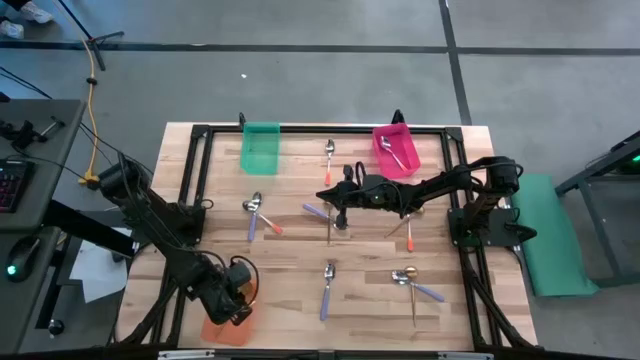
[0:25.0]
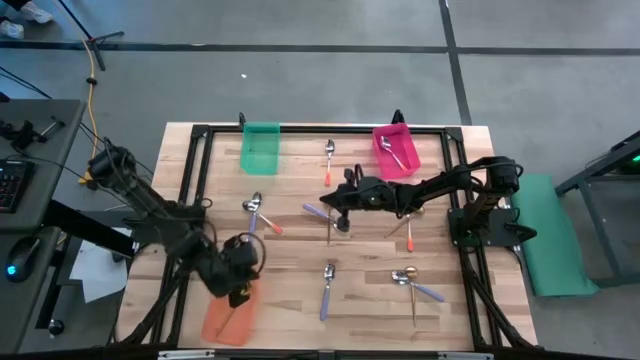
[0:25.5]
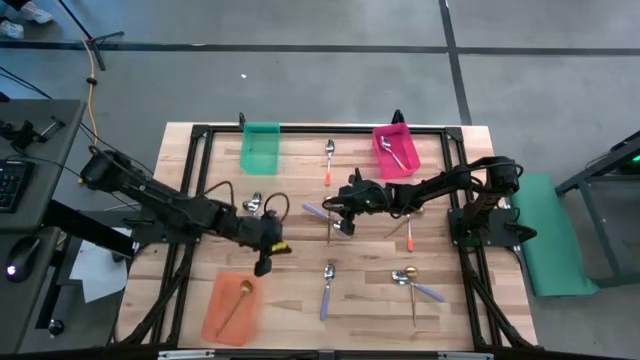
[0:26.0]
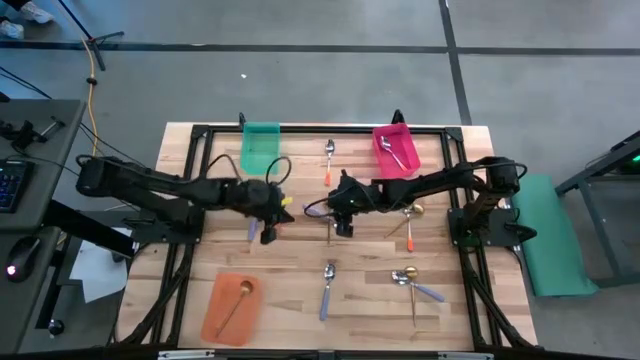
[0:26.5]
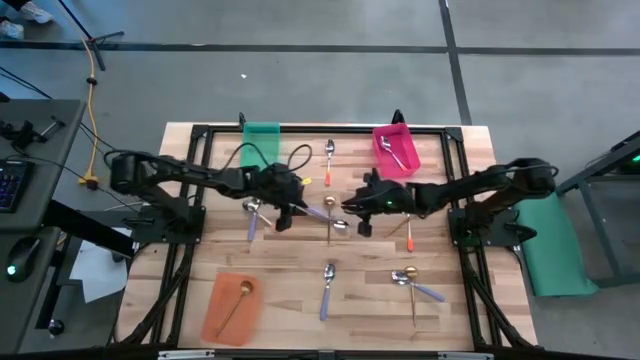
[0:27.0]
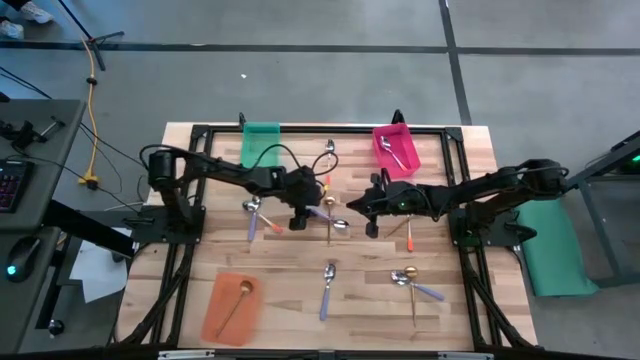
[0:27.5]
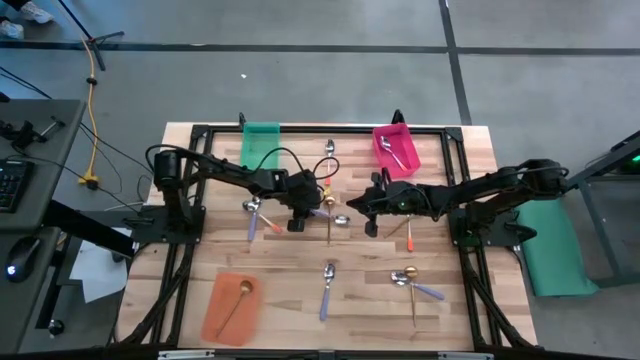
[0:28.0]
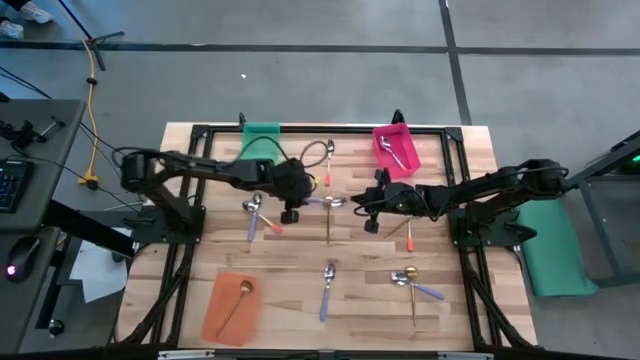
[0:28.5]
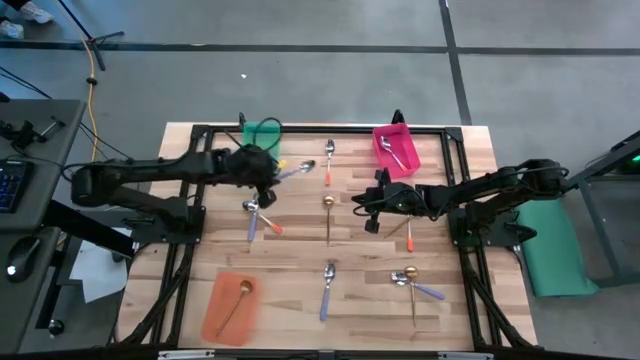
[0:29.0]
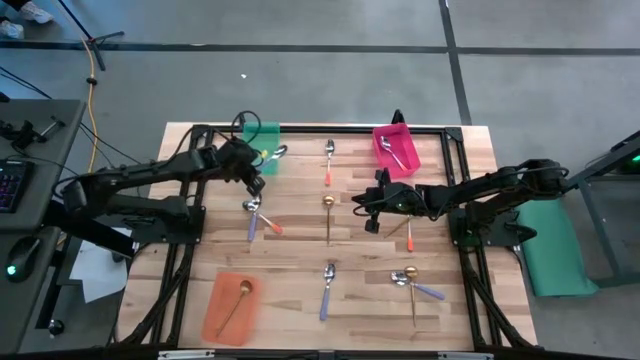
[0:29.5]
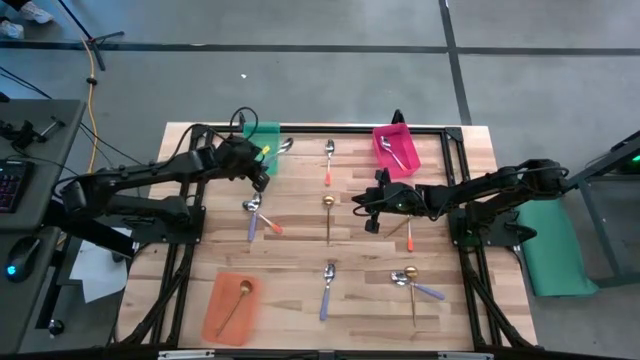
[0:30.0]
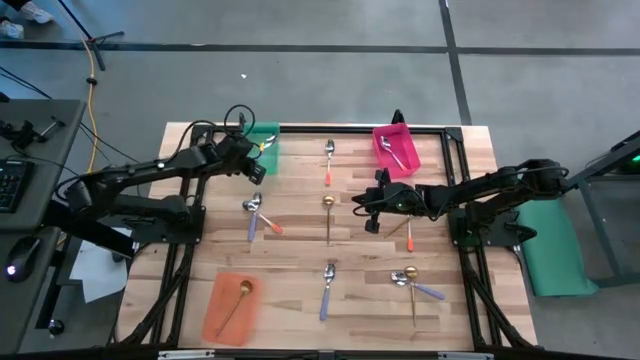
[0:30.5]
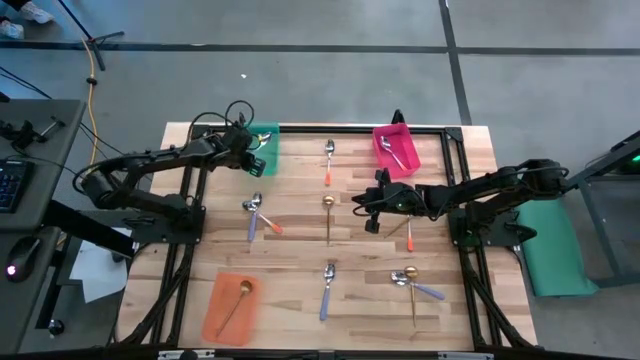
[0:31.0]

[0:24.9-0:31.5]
Task: Sort silverware by color (type)
Put the purple spoon into the blue bin

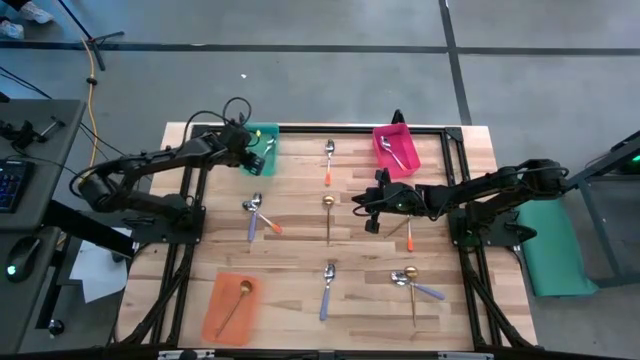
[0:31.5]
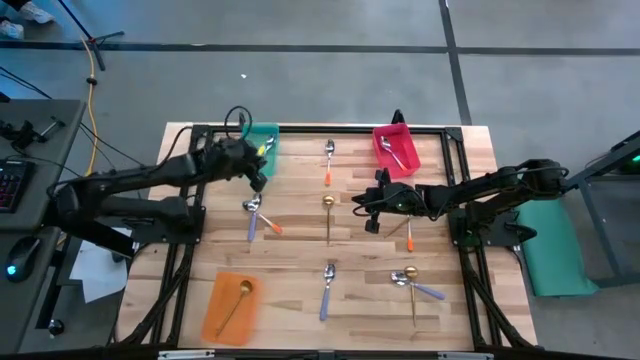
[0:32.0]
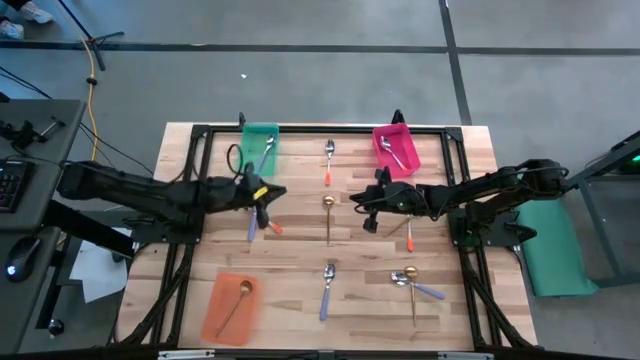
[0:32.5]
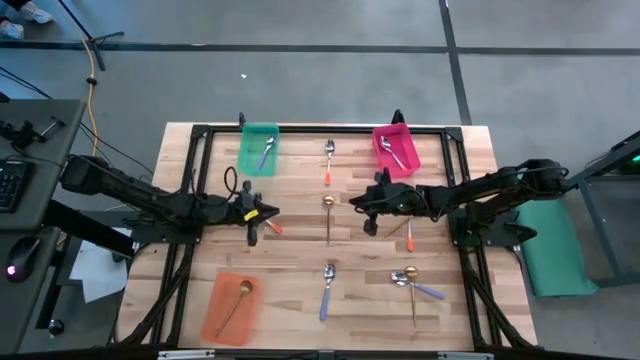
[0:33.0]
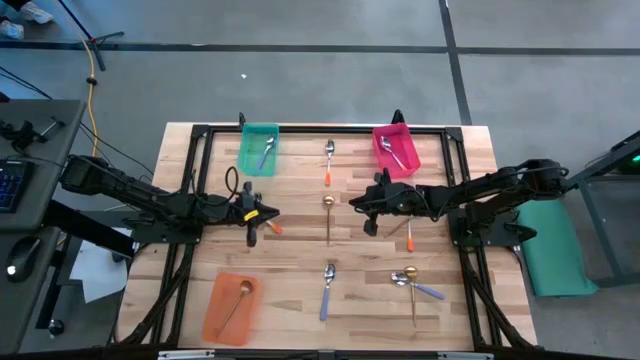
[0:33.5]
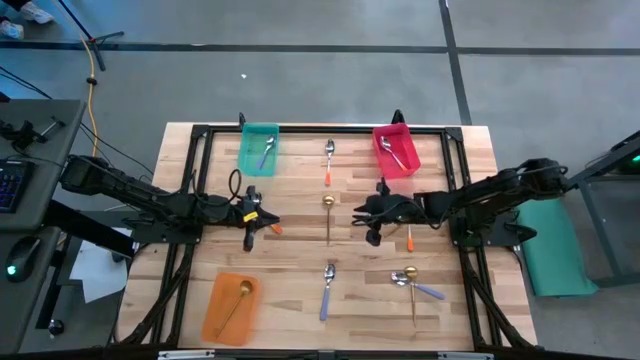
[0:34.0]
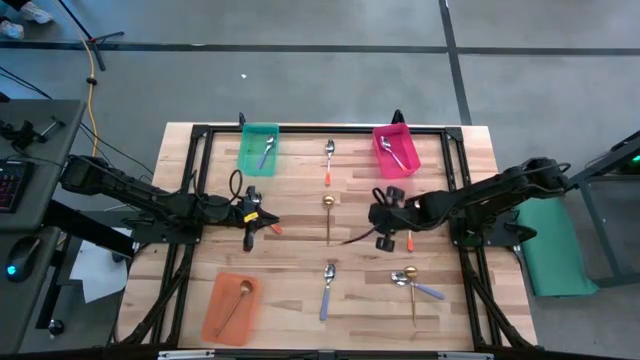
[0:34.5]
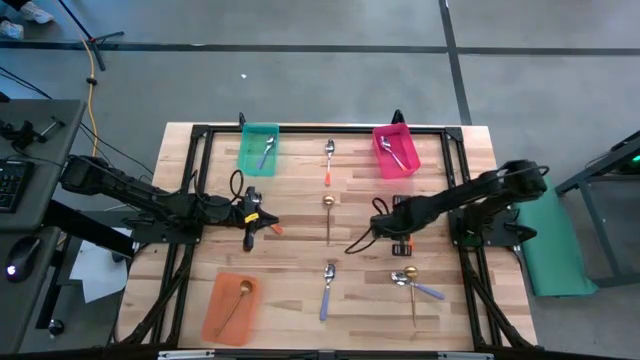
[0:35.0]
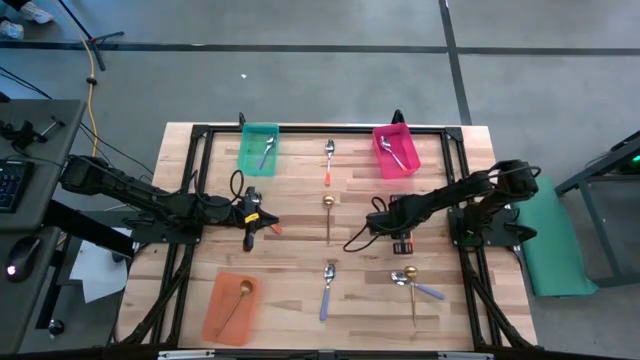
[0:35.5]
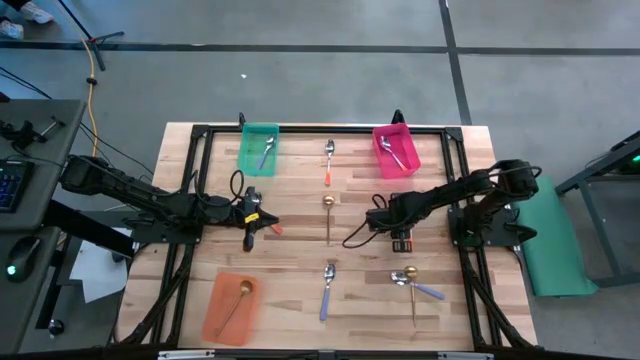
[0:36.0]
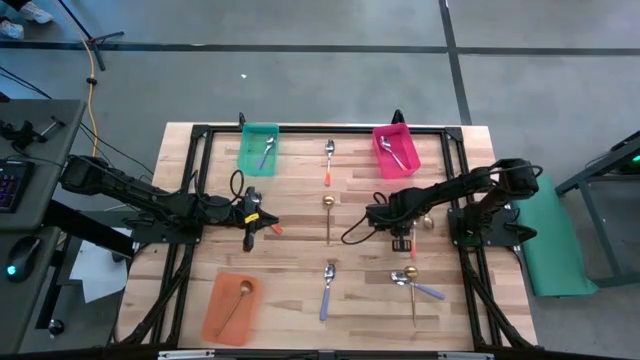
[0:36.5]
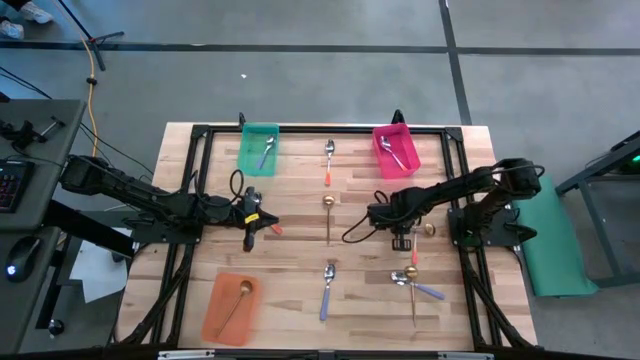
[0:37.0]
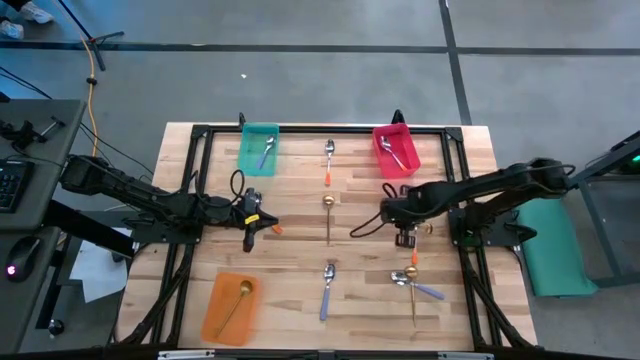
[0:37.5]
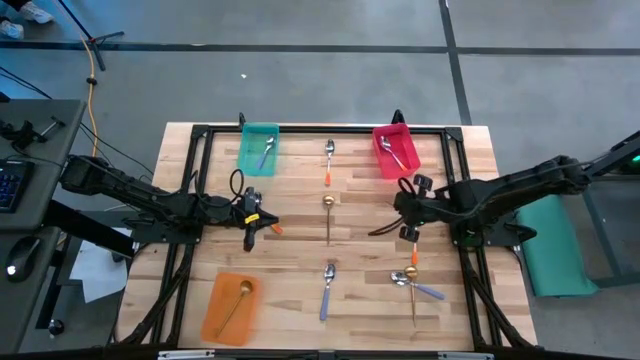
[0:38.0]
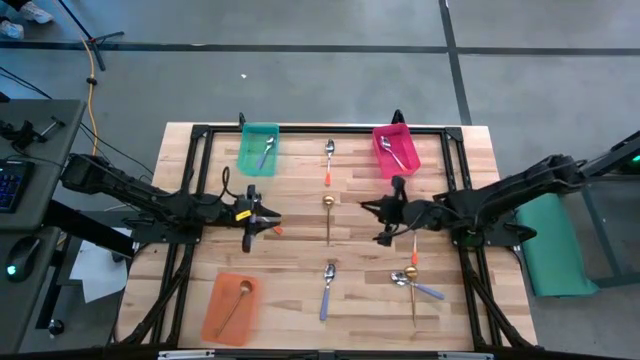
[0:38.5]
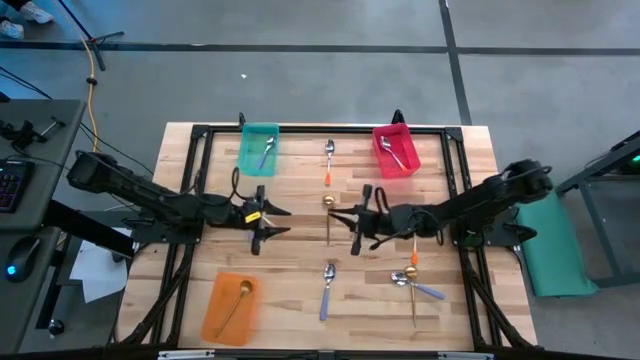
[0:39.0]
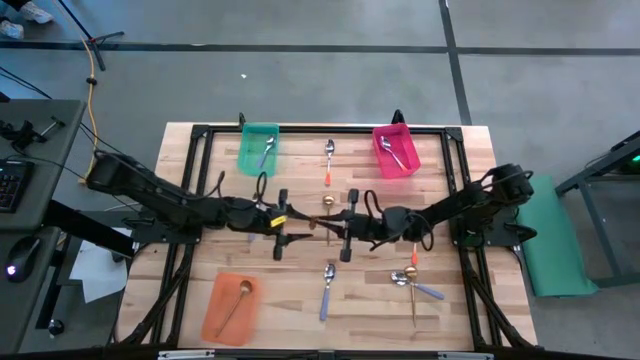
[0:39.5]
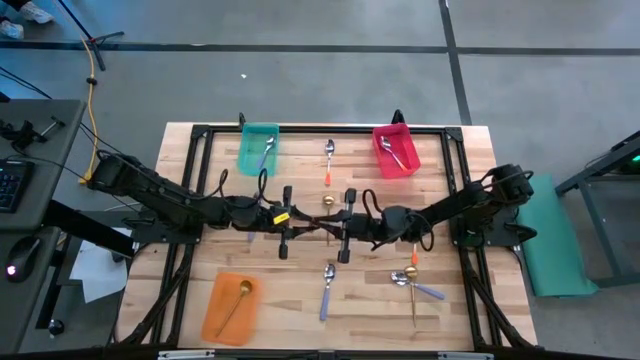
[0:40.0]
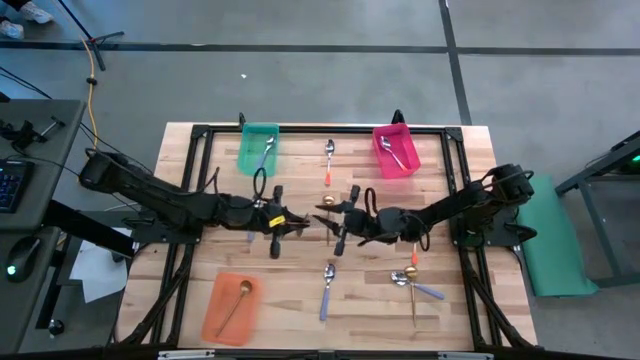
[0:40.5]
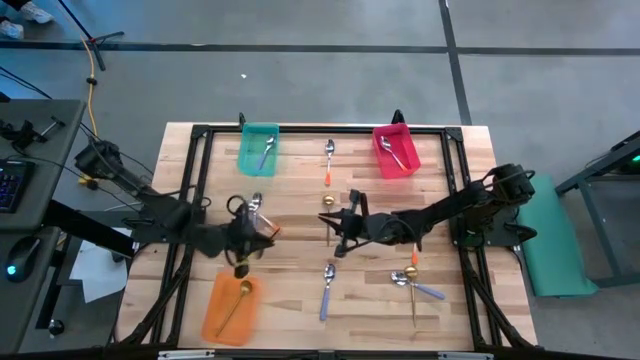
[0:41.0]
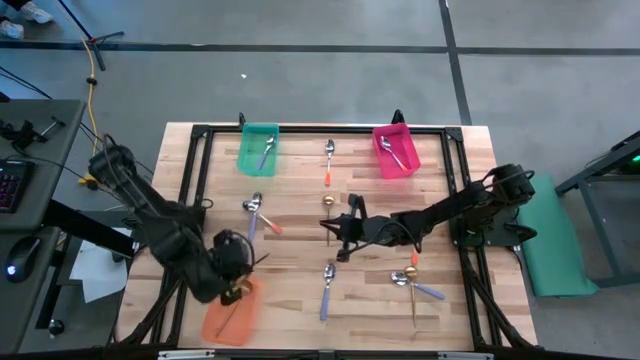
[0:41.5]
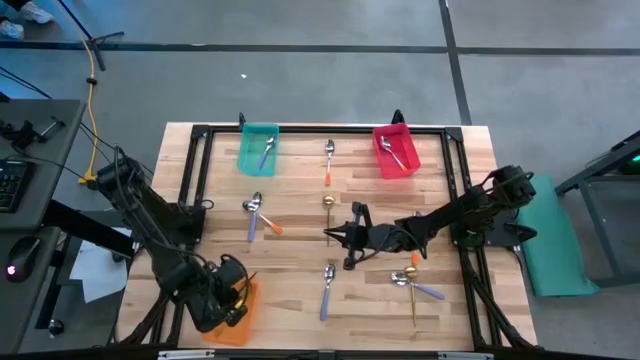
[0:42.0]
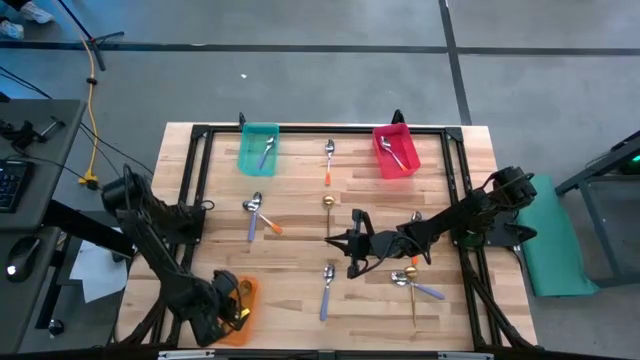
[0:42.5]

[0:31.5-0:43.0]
Put the gold spoon into the orange bin

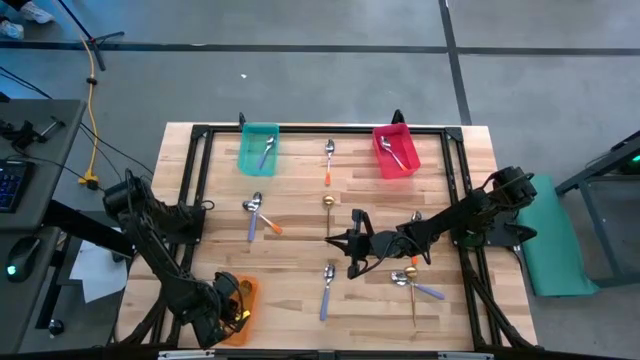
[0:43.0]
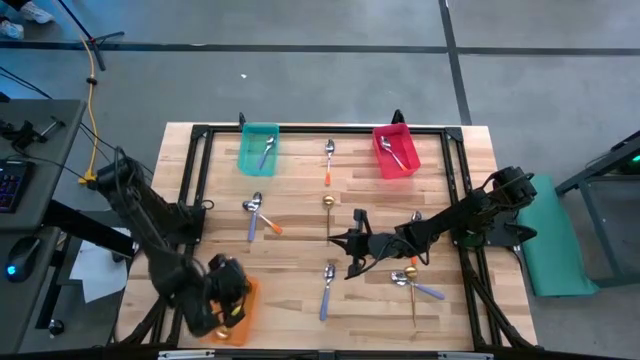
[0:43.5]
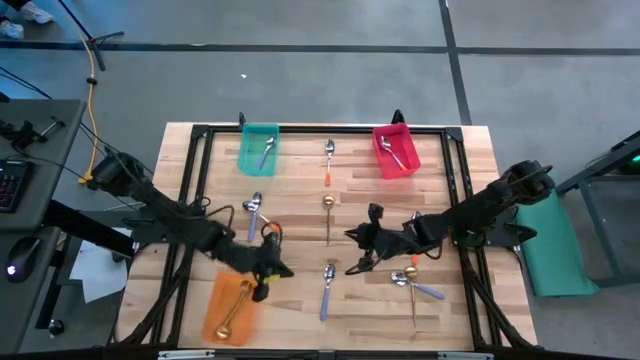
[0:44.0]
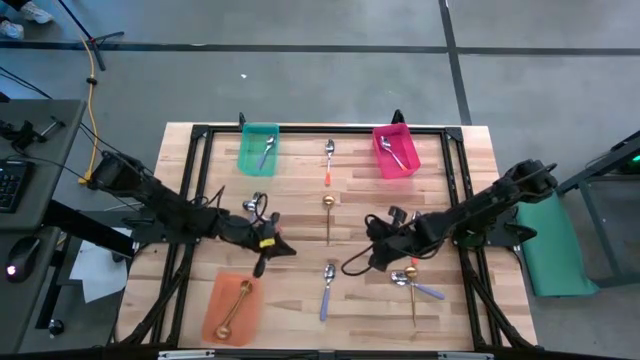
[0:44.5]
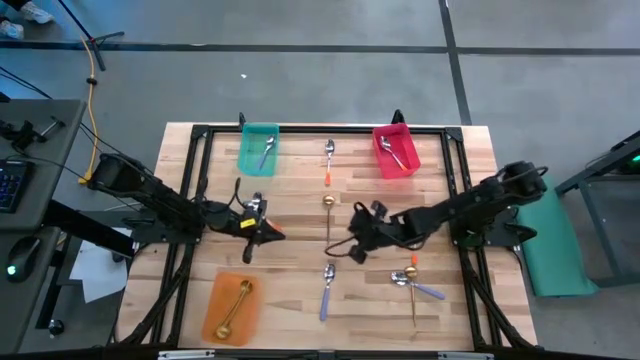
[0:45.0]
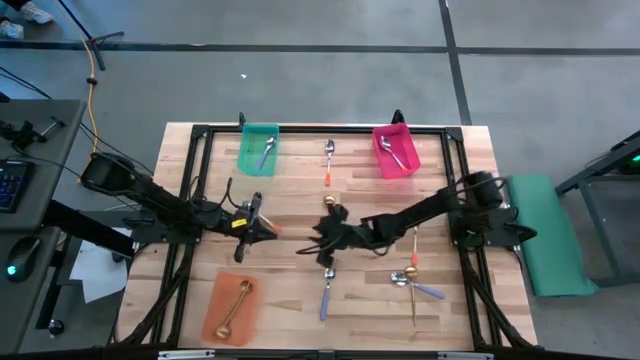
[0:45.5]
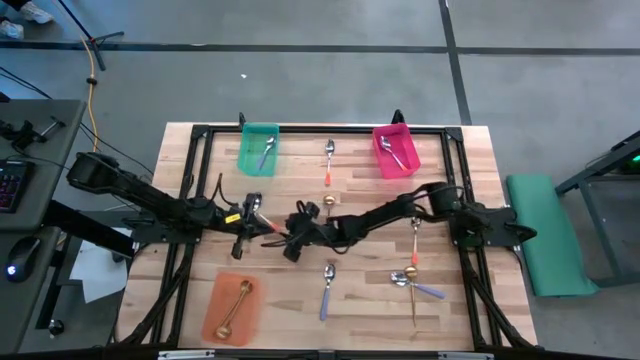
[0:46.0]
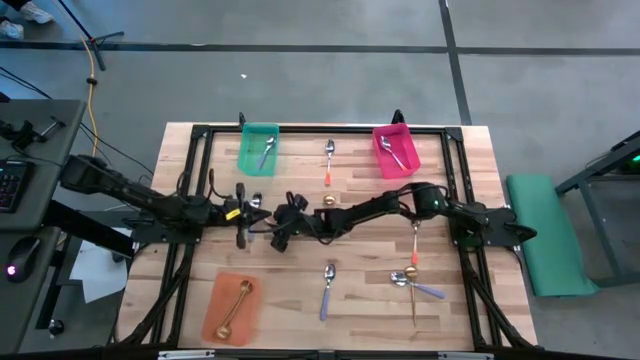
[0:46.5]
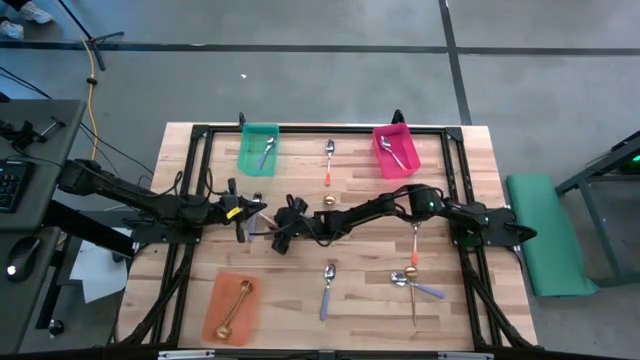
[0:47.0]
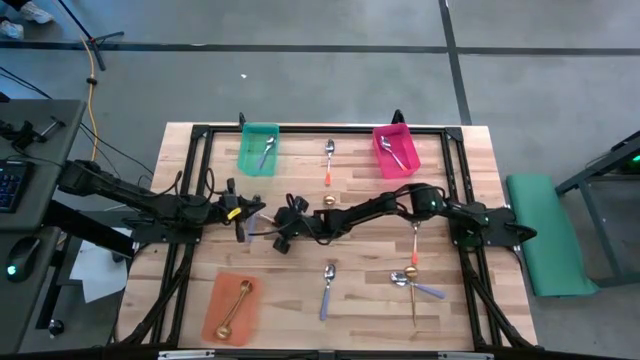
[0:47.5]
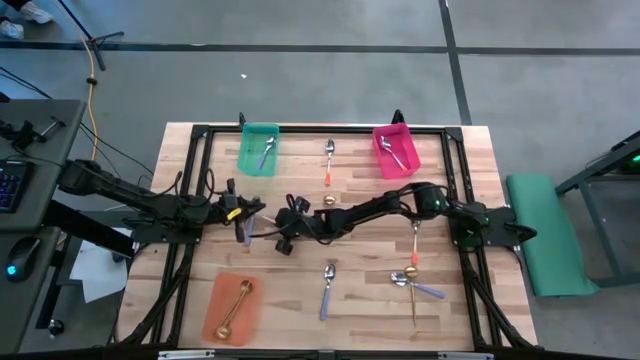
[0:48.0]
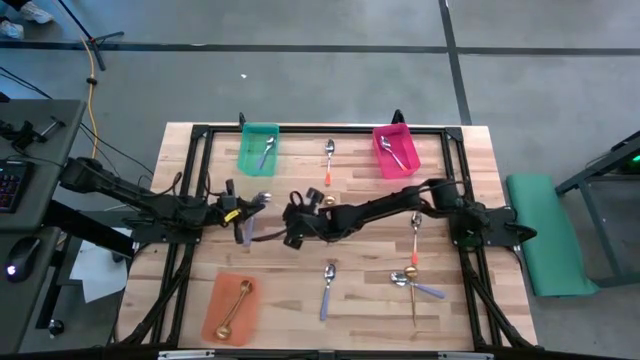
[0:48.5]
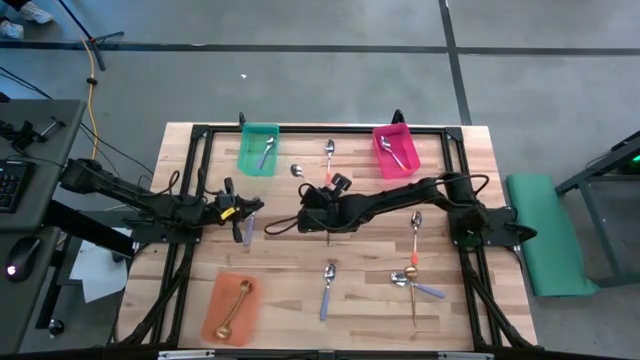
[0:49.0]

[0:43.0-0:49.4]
Put the orange spoon into the pink bin
